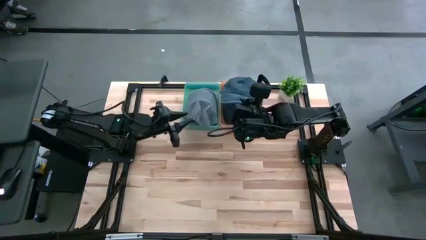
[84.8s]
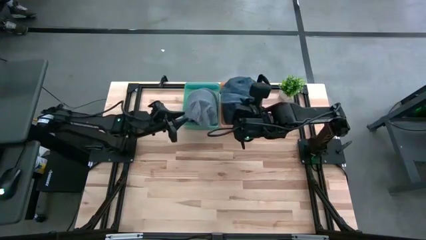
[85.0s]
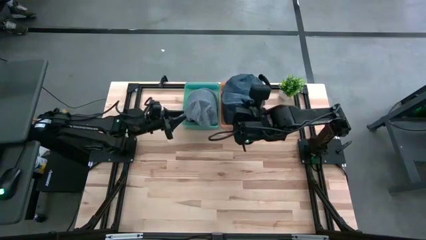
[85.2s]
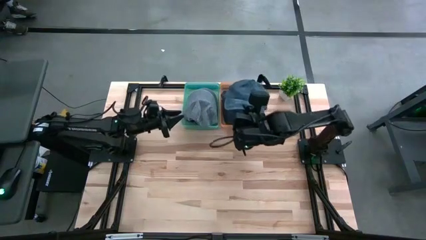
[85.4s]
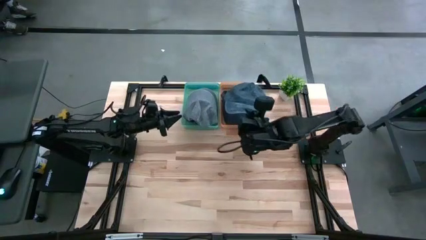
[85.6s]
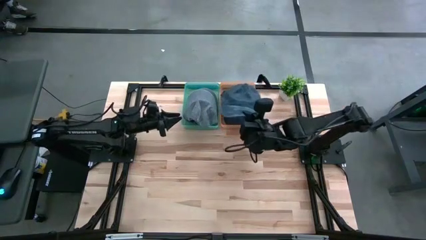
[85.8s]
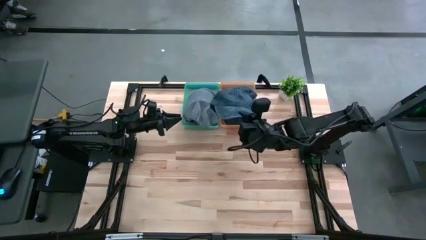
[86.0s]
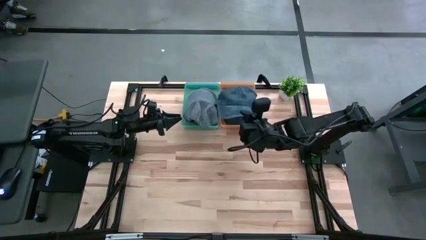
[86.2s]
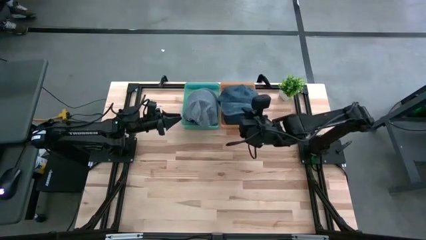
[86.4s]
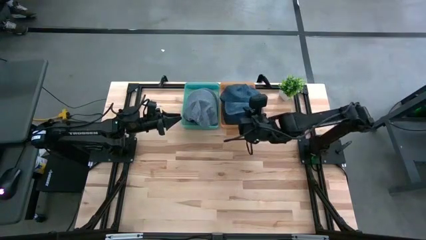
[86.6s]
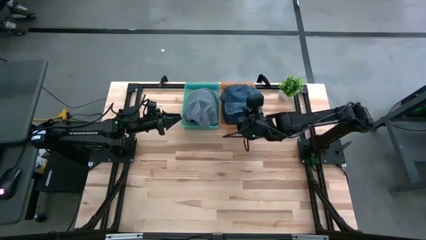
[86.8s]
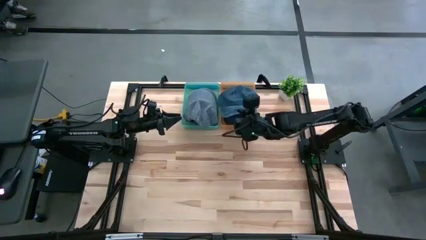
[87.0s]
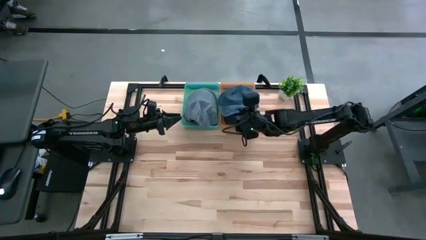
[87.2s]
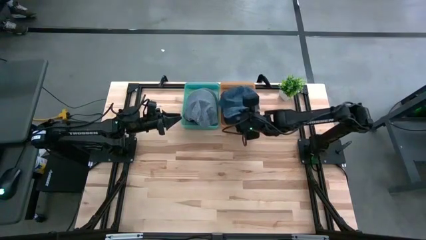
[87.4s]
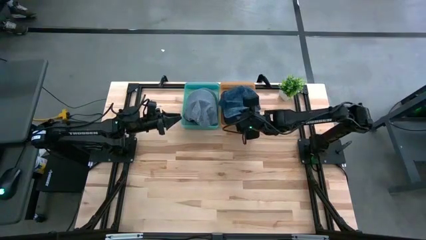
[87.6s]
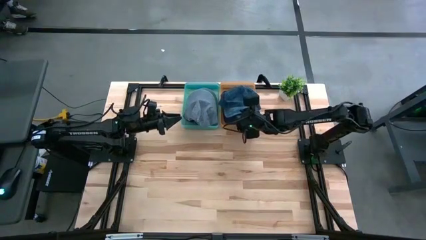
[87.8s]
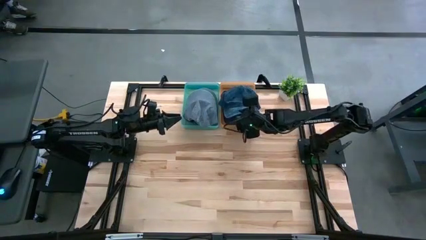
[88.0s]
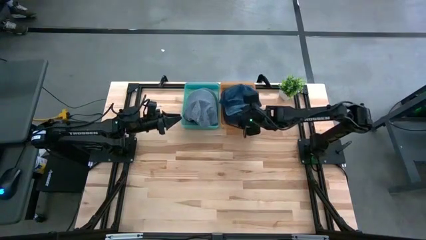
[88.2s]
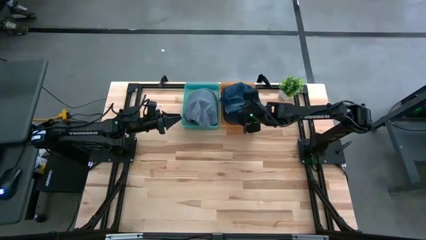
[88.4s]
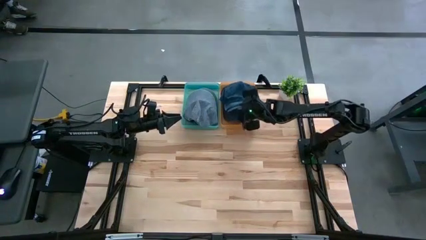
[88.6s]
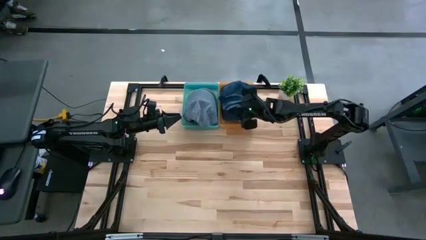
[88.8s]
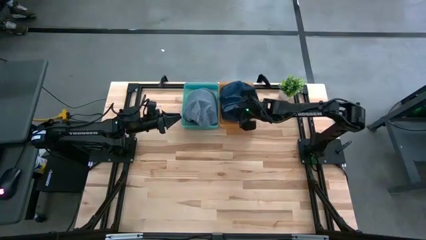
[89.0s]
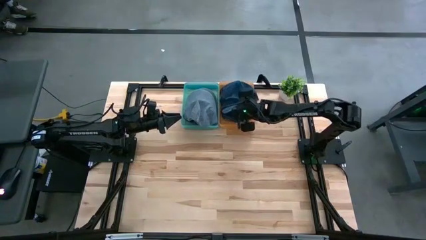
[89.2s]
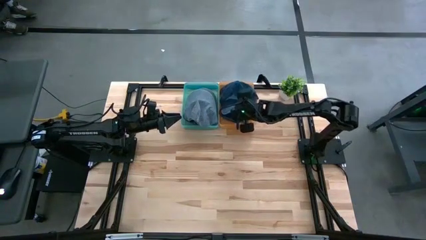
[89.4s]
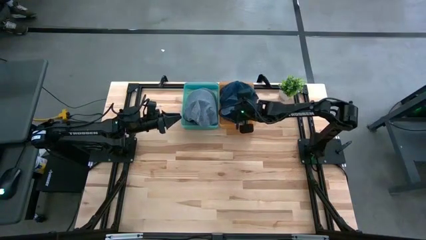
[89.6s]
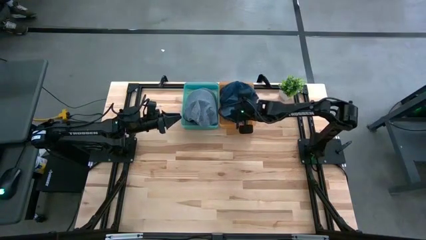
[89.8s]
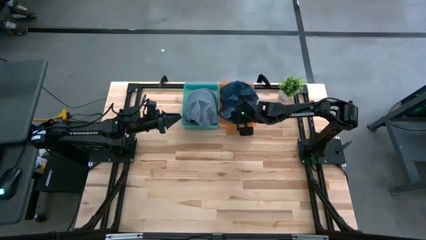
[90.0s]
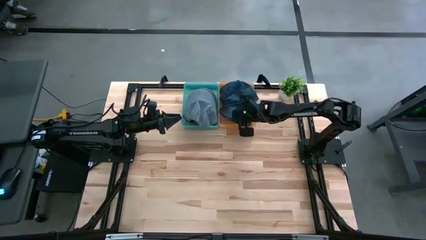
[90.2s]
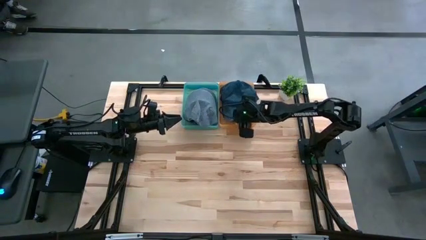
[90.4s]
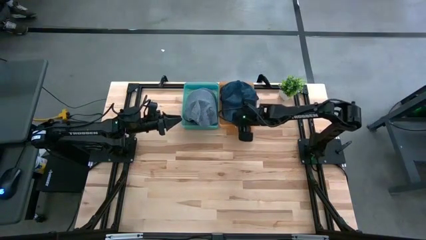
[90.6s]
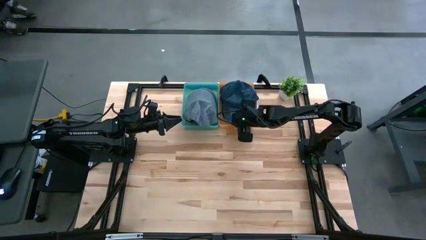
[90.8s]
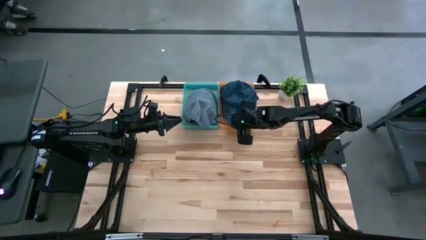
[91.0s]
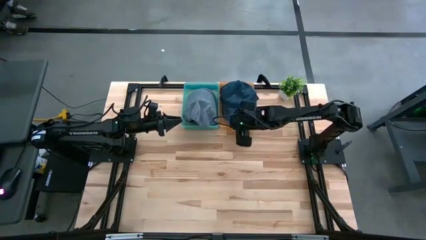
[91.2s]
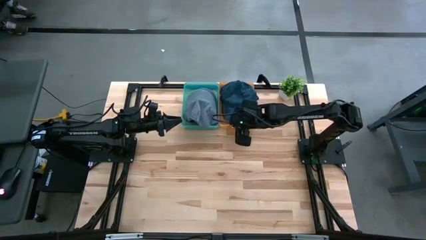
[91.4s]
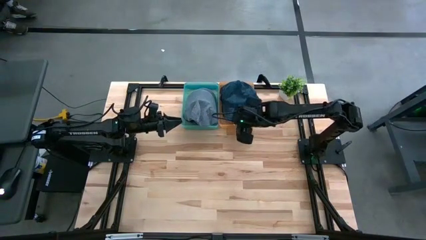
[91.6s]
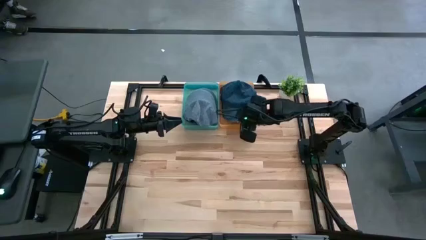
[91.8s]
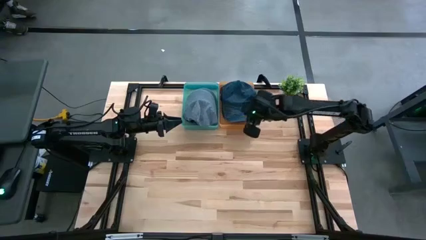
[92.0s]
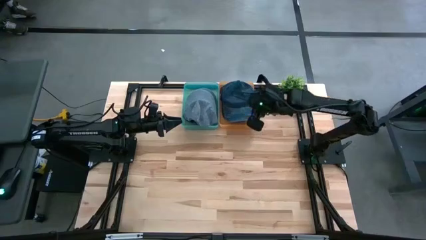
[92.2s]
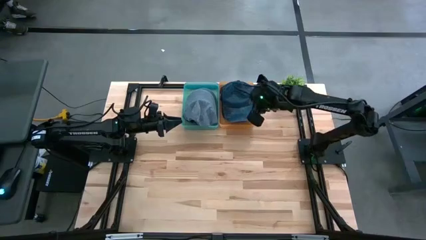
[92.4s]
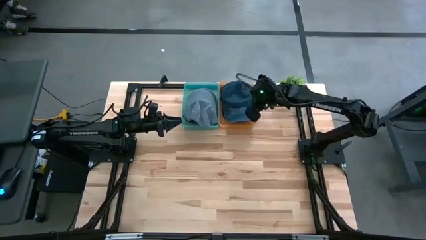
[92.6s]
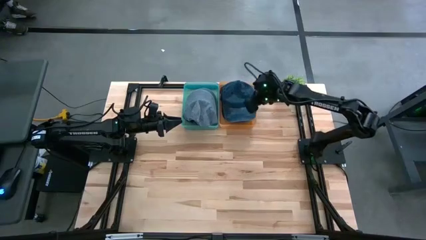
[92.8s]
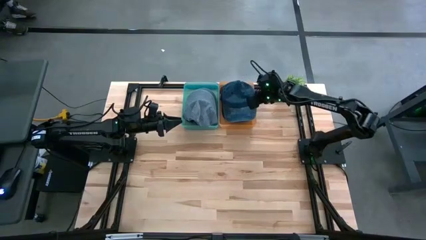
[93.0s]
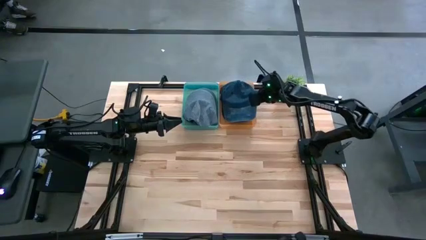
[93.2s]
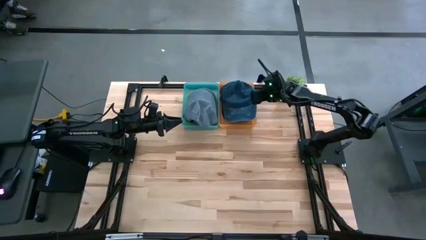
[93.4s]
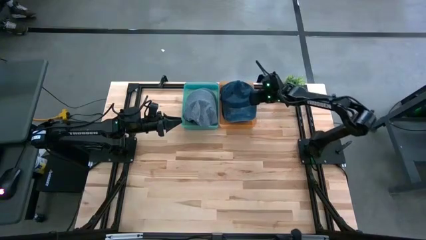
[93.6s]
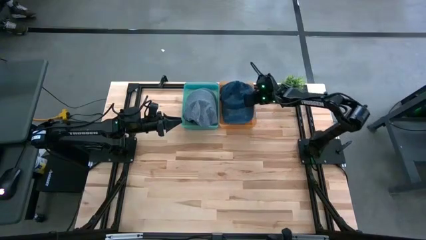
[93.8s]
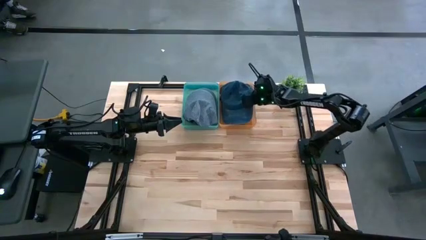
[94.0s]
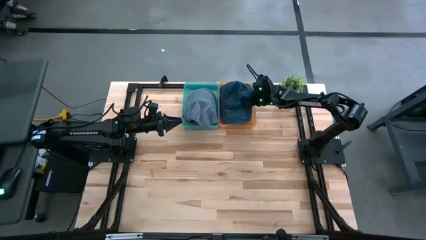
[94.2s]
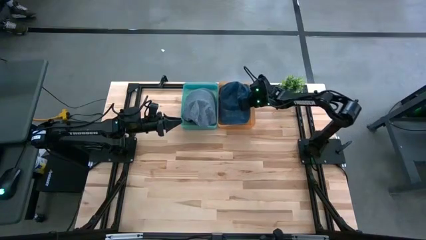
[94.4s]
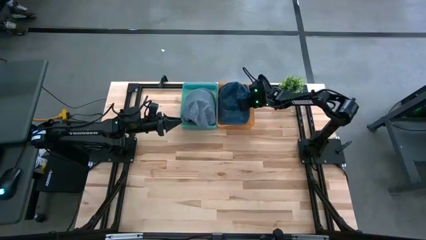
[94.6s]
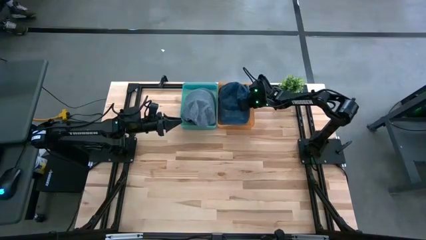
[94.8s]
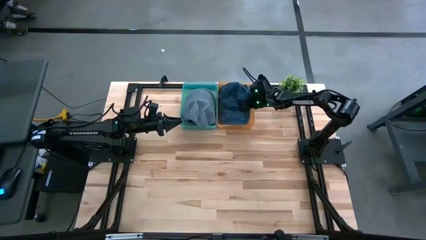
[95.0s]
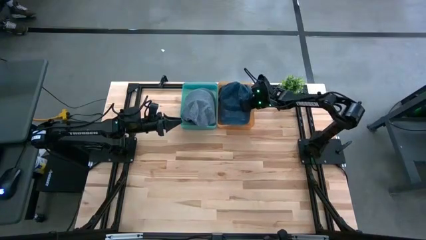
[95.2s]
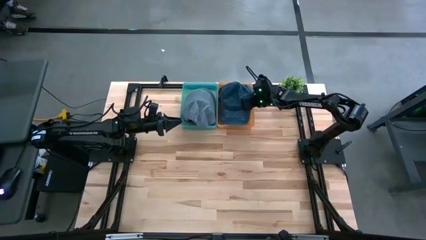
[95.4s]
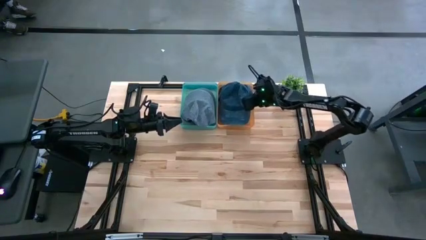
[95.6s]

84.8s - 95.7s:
Task: Pick & Place hat
Put the black cap into the orange bin

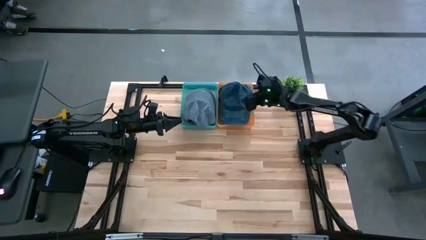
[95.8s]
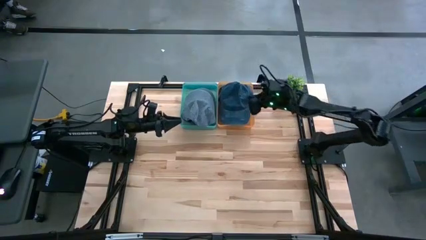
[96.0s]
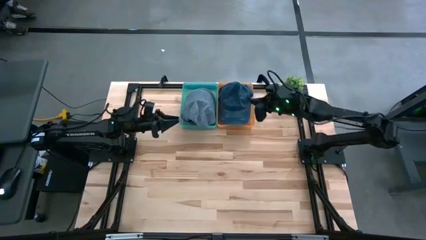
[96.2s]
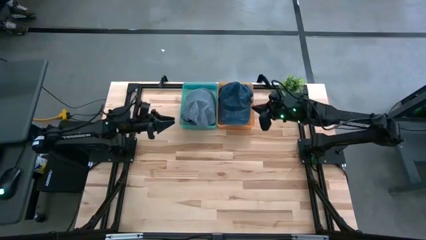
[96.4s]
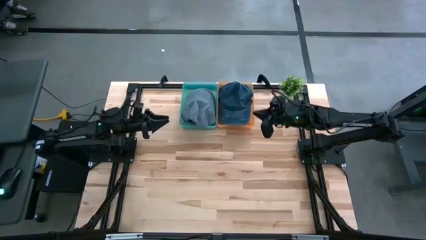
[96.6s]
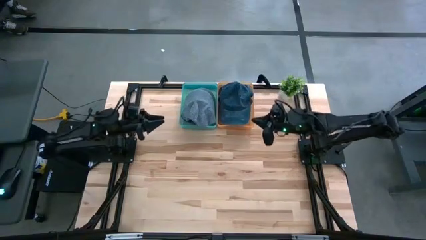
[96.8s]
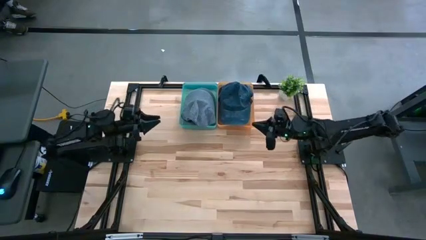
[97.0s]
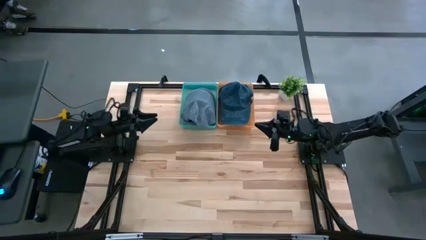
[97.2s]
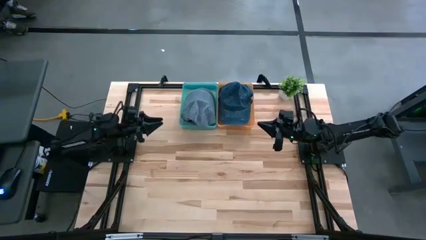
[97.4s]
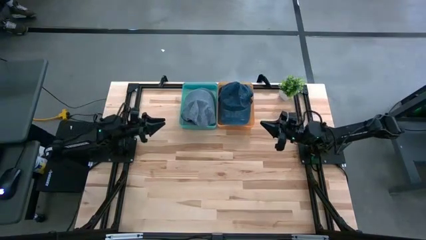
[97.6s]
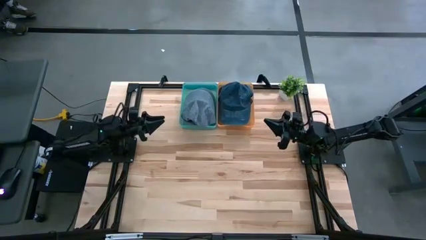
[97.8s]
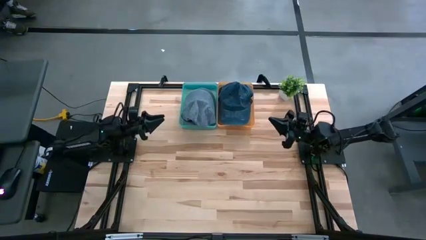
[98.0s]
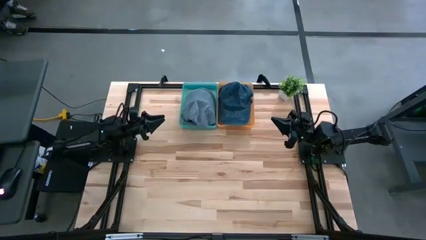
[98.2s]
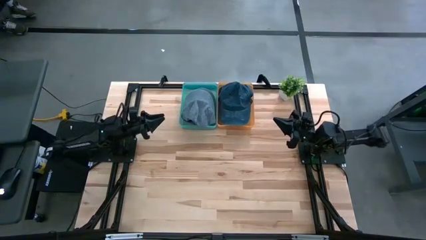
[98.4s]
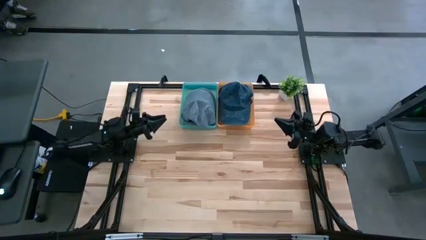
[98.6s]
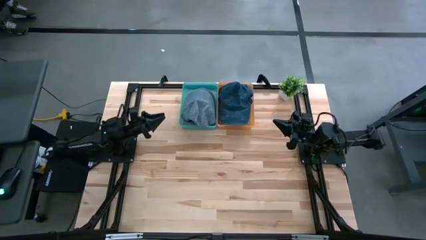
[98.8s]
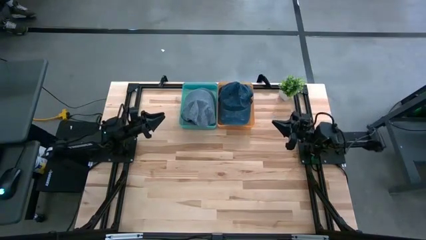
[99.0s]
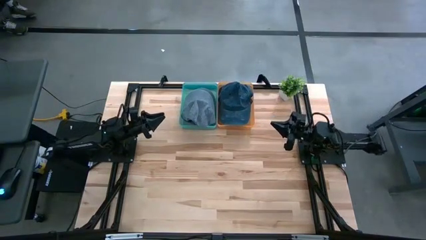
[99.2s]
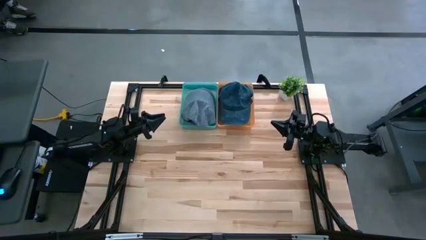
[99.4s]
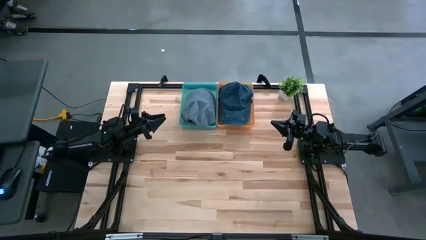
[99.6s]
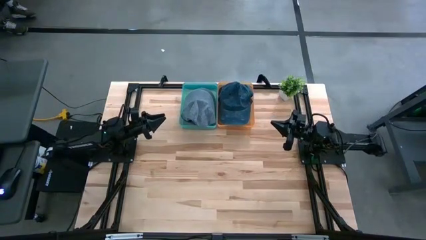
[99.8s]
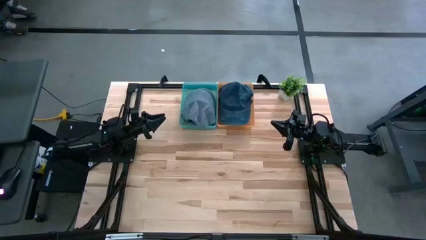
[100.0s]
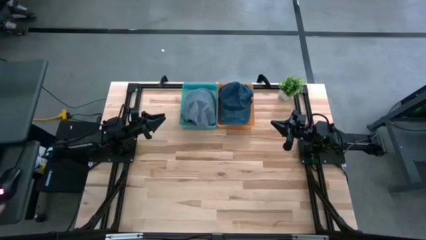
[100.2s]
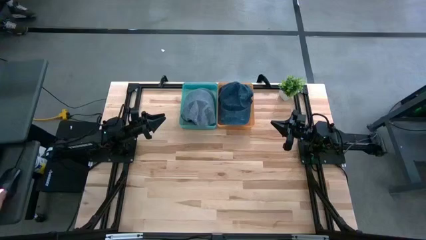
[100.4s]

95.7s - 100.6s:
Return to Home Position
